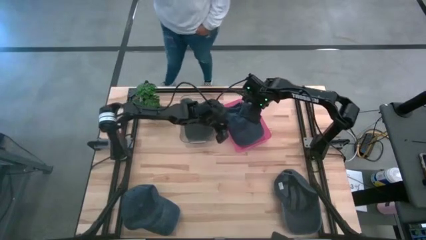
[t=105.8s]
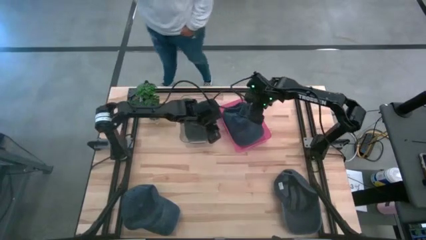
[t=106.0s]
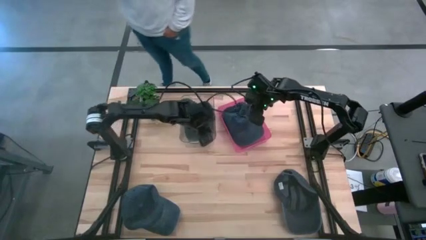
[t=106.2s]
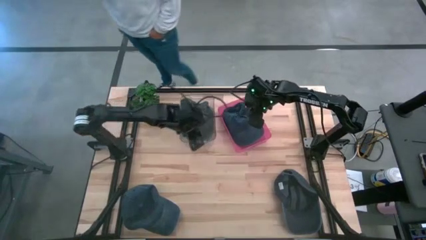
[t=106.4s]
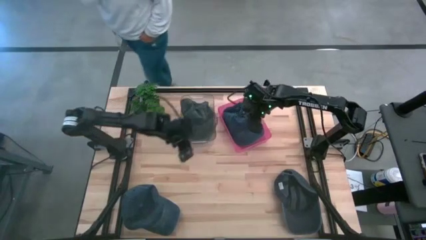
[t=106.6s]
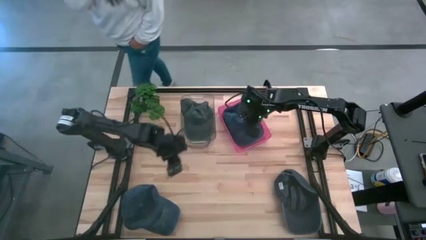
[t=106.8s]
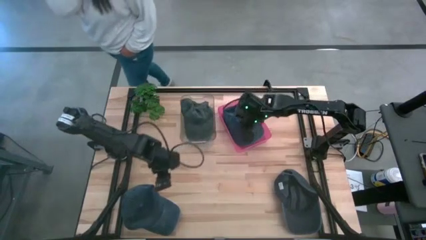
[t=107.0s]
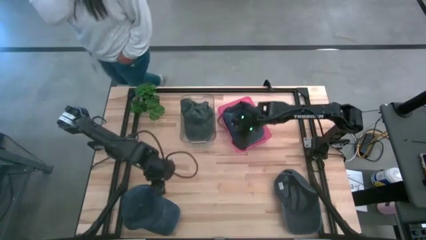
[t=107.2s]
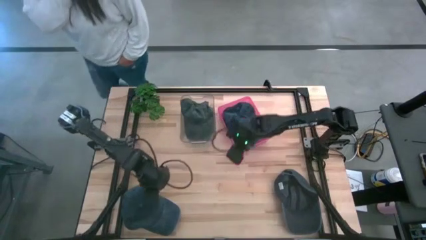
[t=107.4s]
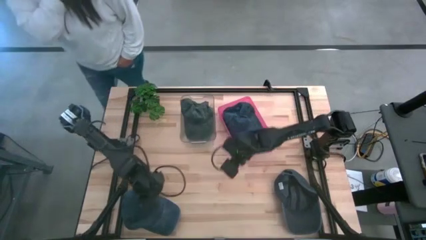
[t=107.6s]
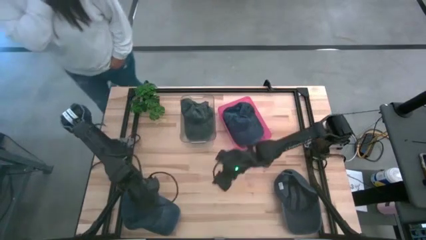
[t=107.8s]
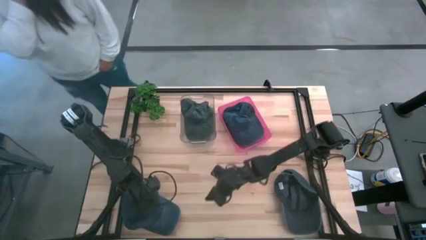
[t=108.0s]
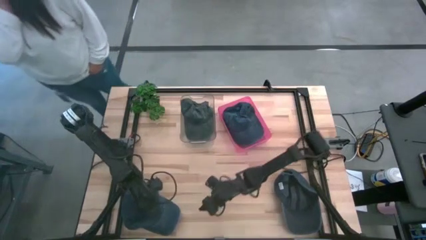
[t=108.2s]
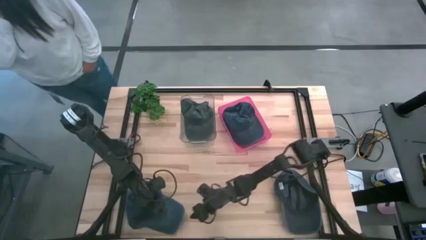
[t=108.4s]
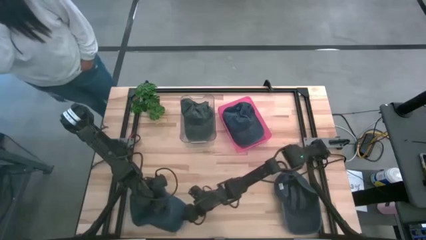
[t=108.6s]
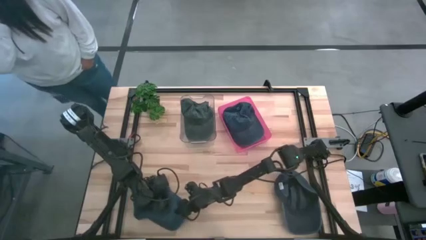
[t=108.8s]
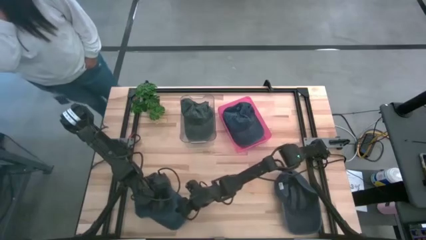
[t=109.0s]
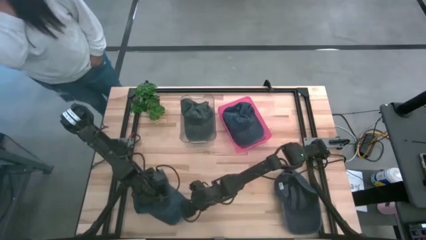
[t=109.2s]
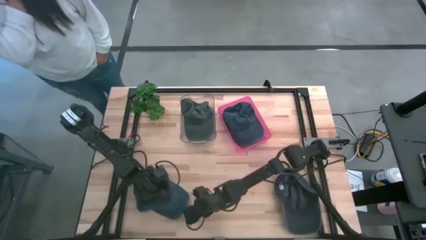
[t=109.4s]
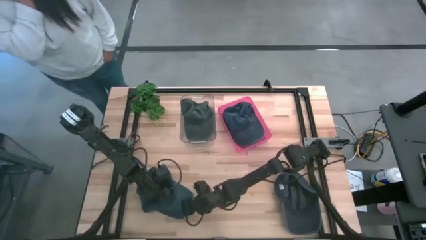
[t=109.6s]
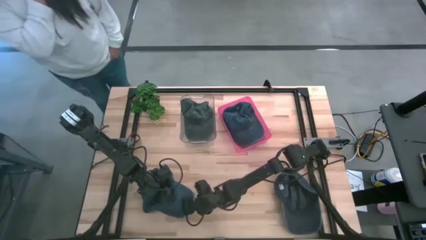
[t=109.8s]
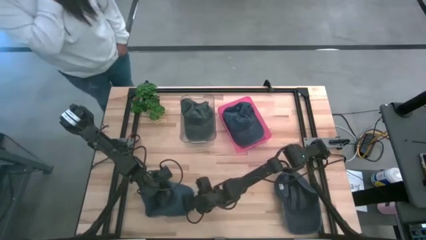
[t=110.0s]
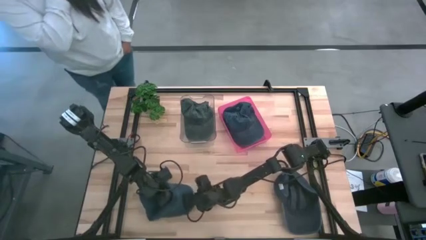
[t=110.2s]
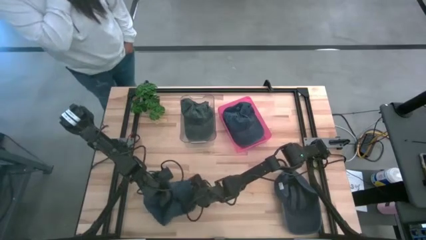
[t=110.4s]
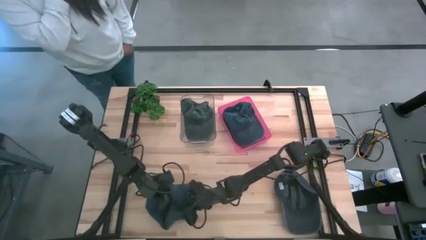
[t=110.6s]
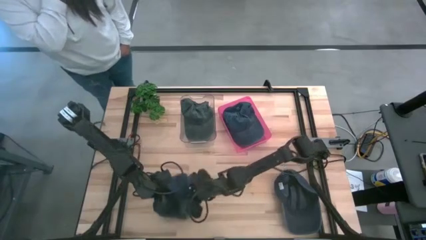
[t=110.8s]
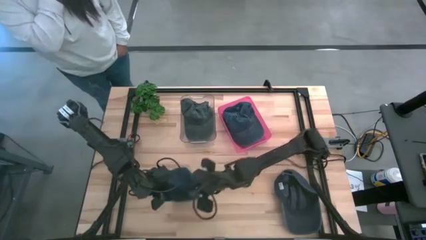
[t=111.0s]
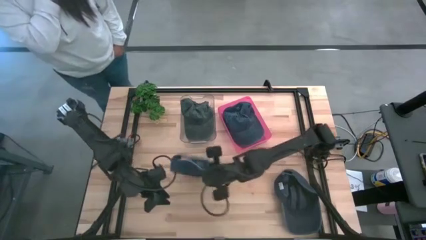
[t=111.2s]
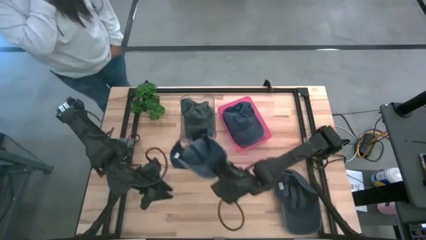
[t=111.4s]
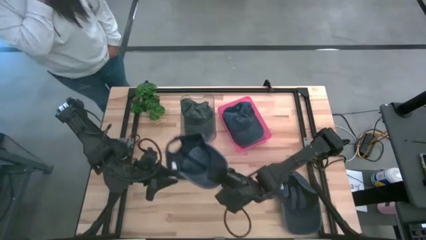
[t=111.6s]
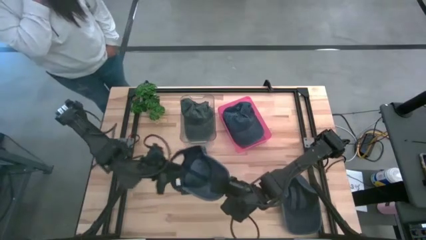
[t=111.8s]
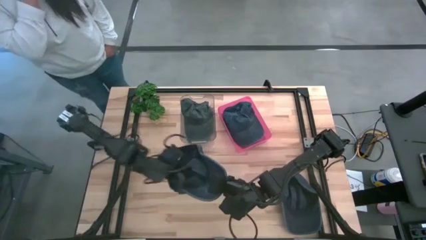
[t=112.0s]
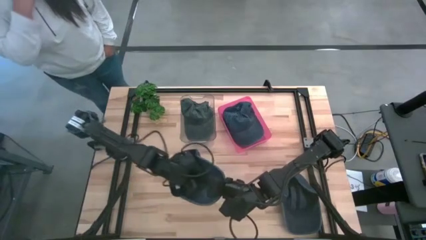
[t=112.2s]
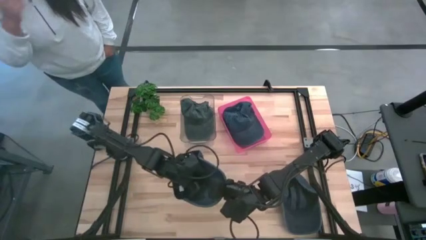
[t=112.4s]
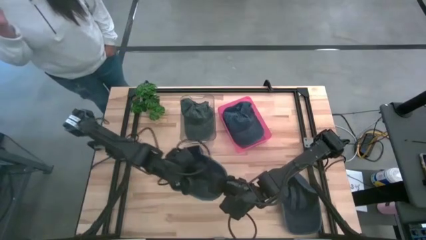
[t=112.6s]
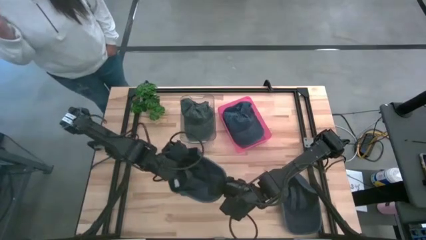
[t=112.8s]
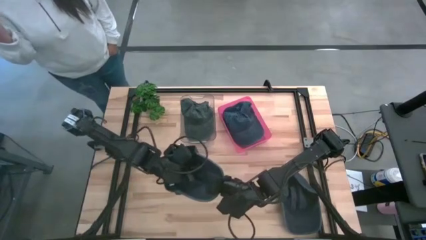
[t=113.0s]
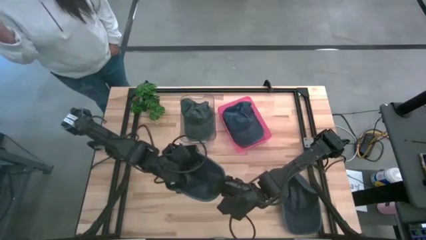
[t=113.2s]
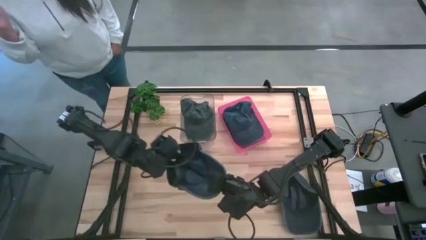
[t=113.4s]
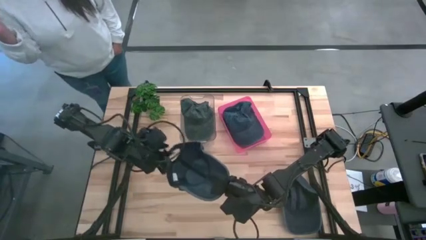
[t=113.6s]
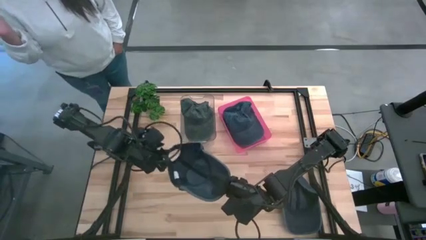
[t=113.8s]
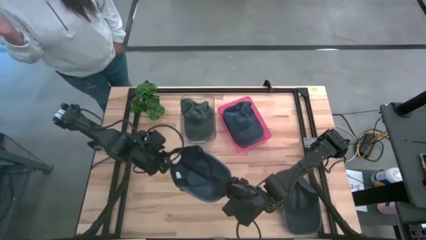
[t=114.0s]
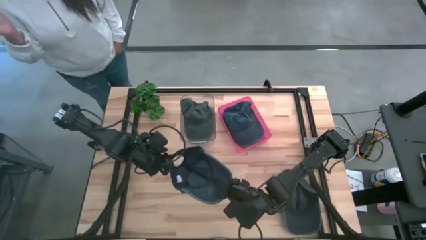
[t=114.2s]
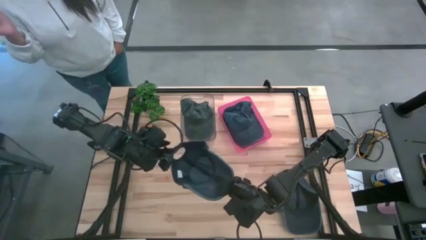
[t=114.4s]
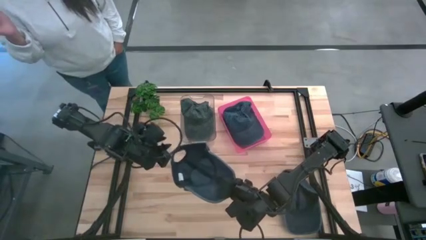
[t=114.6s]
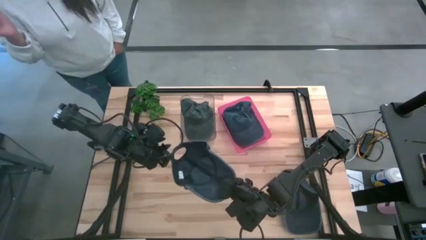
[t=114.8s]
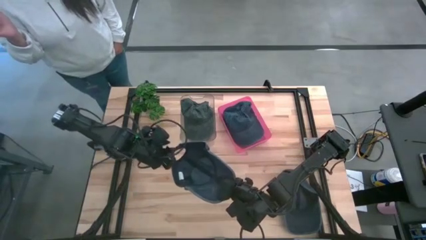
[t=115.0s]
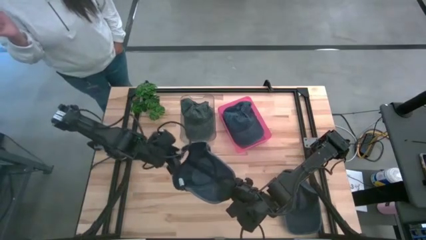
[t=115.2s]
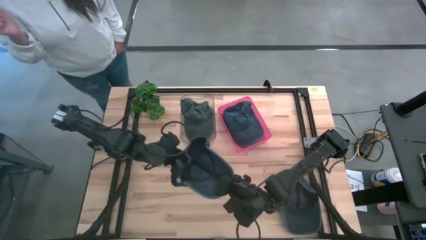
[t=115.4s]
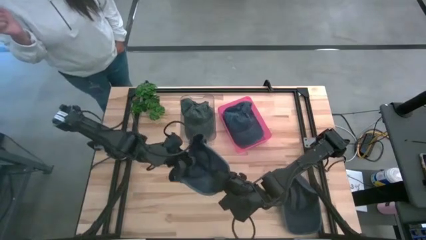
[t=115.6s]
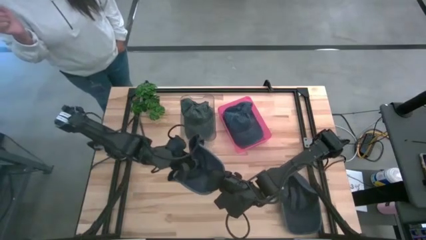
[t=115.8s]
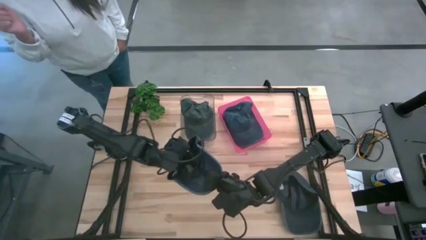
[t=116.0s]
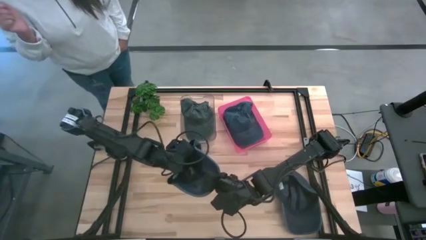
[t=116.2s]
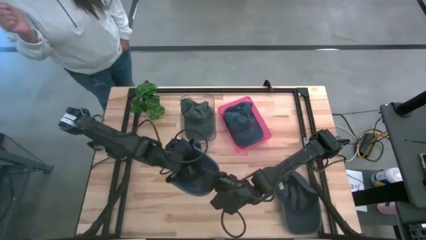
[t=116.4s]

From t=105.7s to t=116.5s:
Task: Pick & Place hat
Put the left blue cap into the red bin

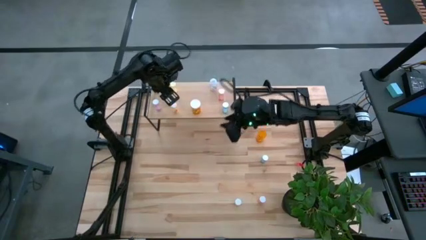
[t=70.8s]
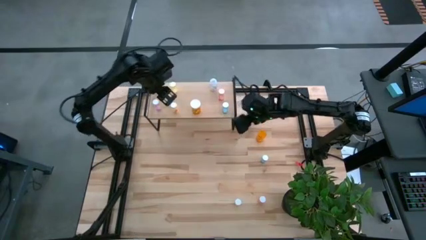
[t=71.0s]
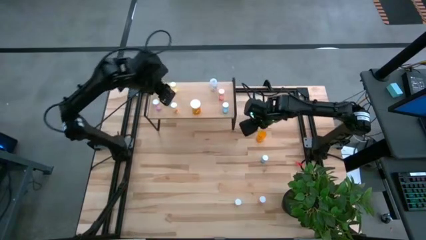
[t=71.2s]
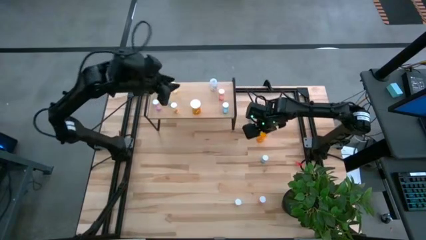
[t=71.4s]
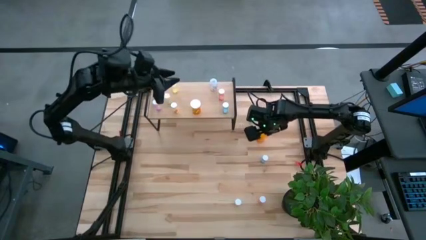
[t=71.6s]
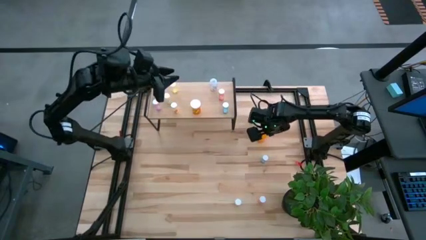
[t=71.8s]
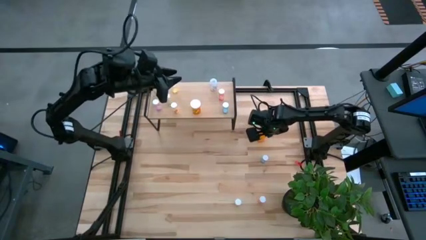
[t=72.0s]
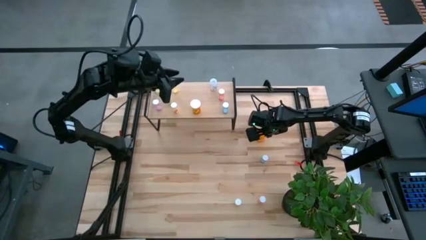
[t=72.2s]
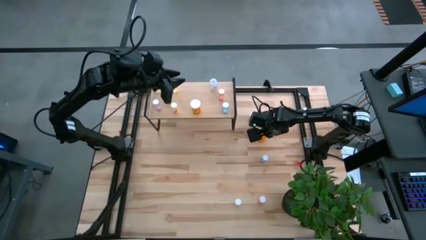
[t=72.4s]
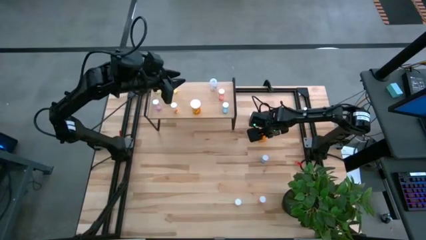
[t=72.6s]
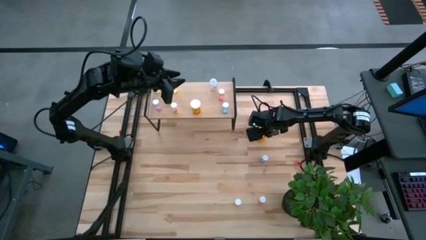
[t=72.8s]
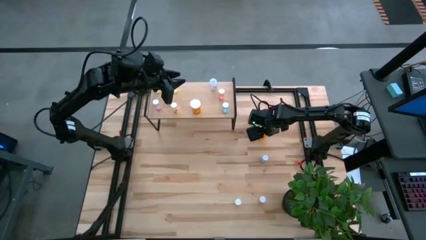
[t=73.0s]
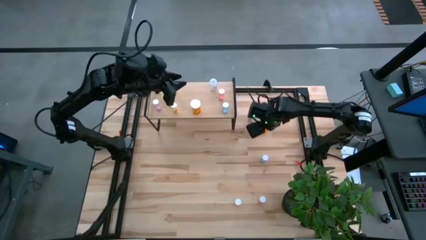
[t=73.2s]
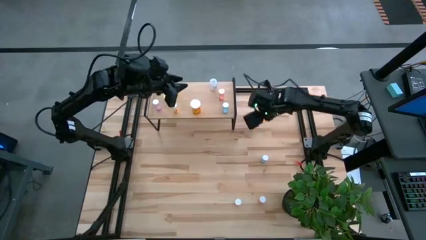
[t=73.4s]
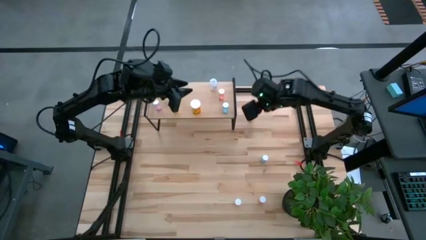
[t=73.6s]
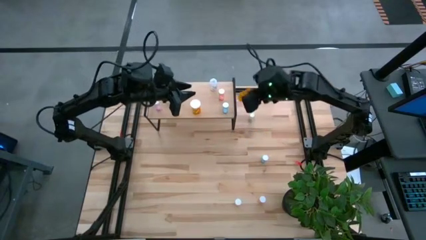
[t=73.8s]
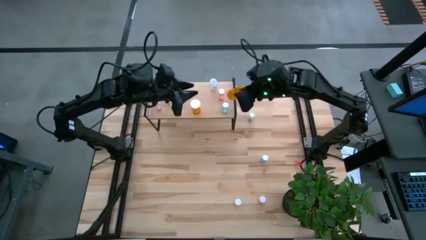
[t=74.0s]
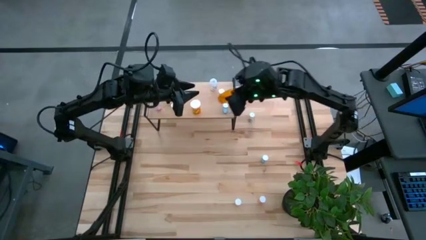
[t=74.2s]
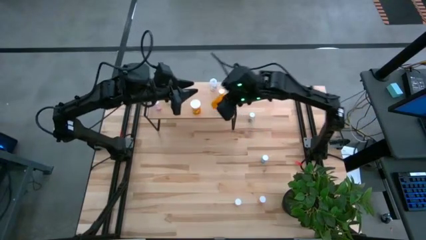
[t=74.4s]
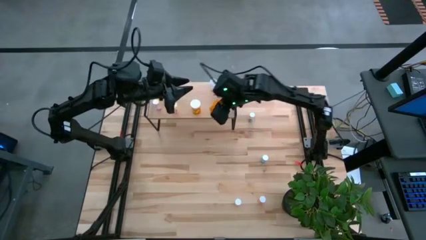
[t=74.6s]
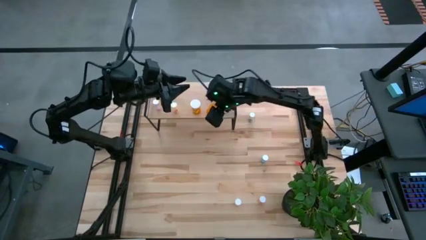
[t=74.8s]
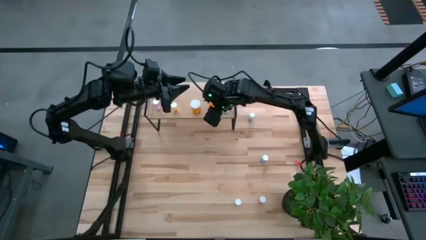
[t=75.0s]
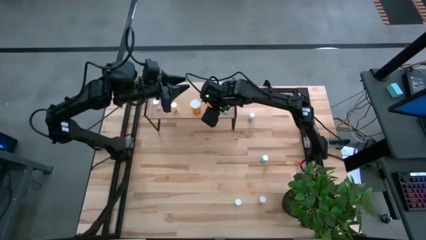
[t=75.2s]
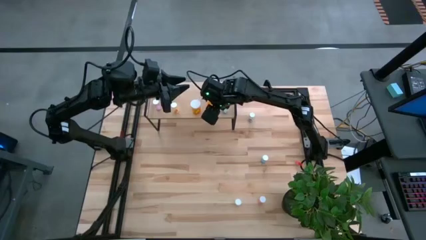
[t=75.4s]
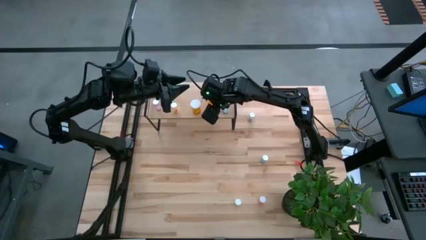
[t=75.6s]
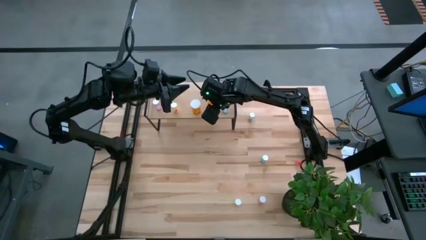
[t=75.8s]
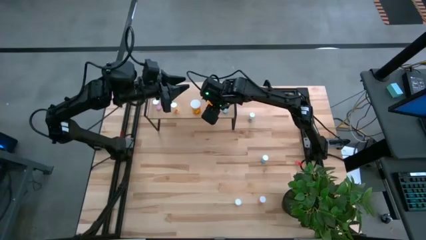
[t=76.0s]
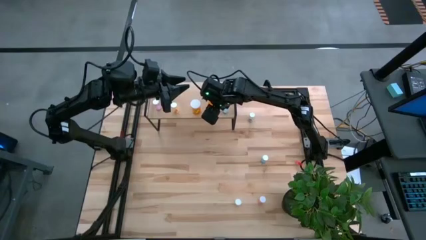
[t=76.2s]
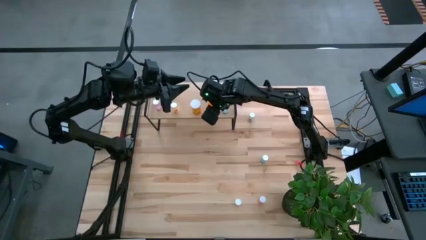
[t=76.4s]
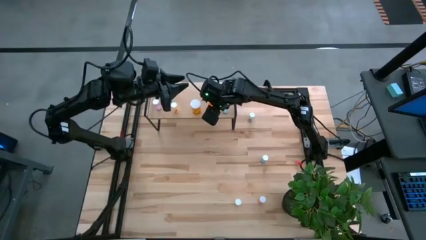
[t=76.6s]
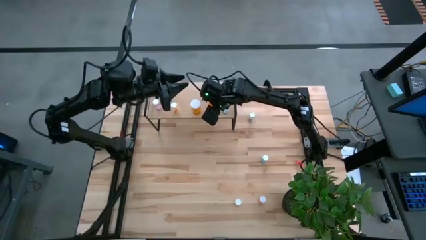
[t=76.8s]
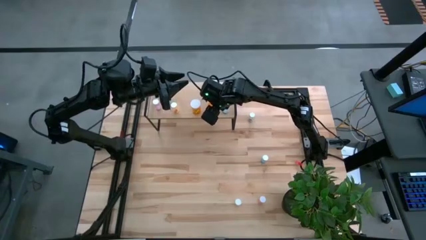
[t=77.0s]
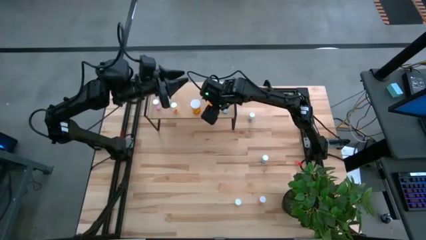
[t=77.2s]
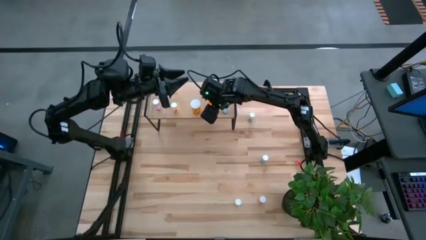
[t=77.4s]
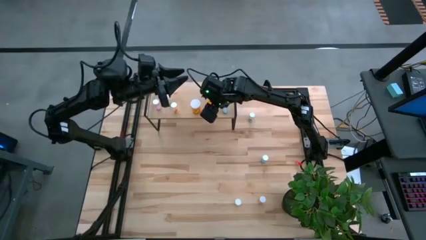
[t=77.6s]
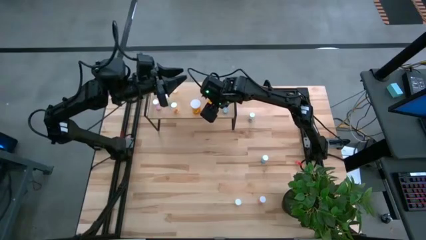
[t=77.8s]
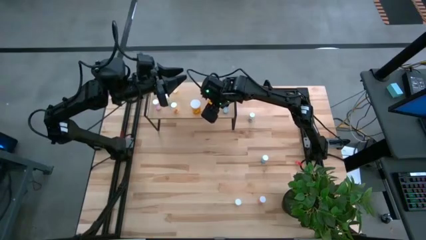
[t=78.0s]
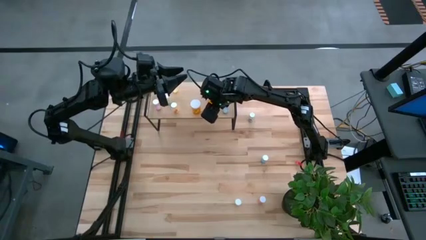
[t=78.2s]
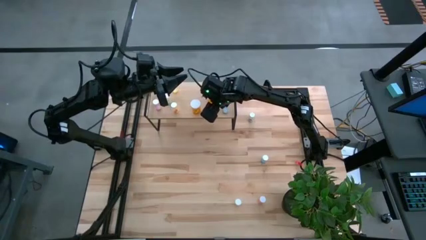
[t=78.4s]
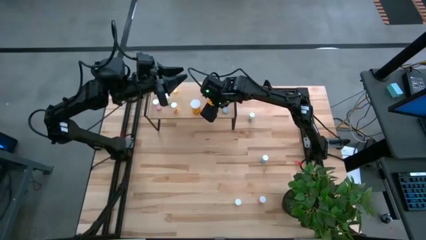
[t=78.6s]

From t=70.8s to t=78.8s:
Task: Pick and place medicine bottles onto shelf by color
Put the orange pill bottle on the shelf
